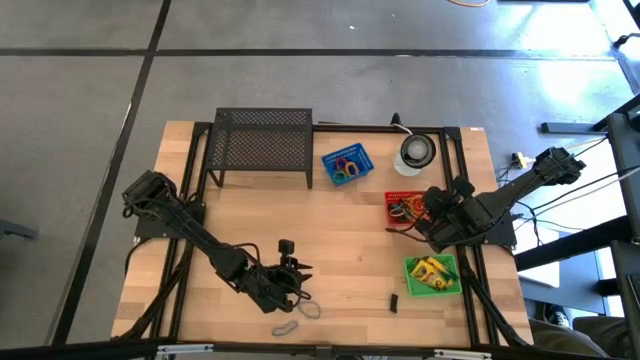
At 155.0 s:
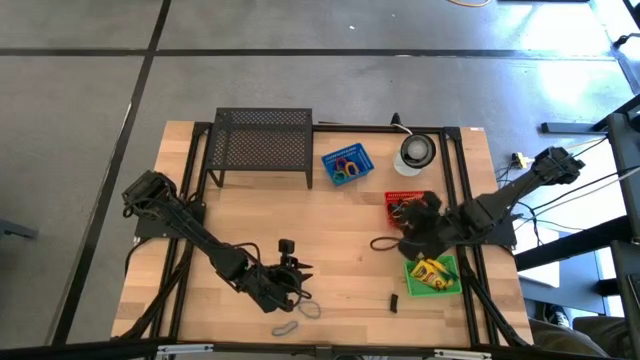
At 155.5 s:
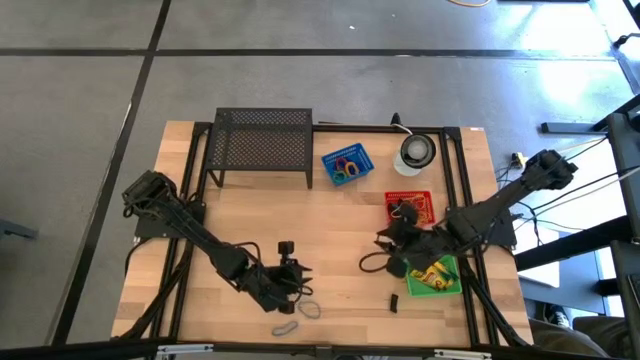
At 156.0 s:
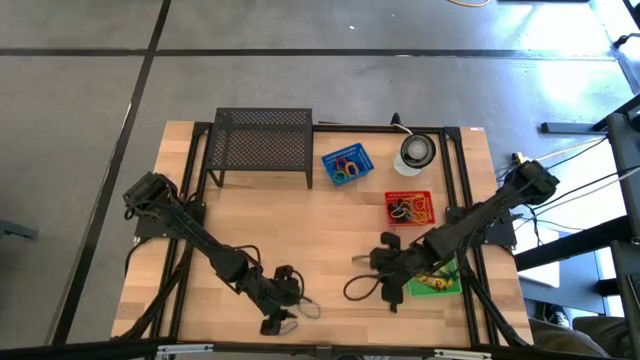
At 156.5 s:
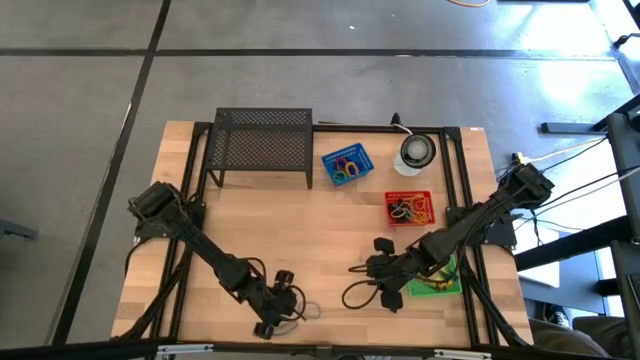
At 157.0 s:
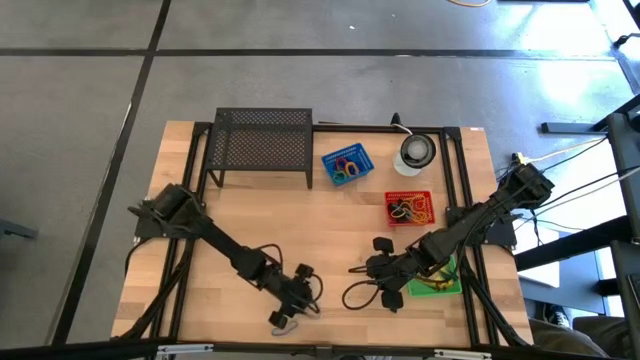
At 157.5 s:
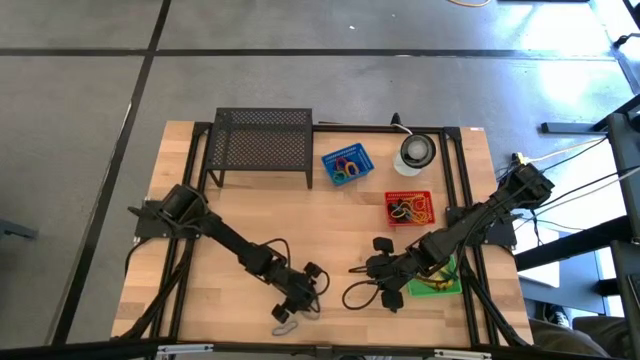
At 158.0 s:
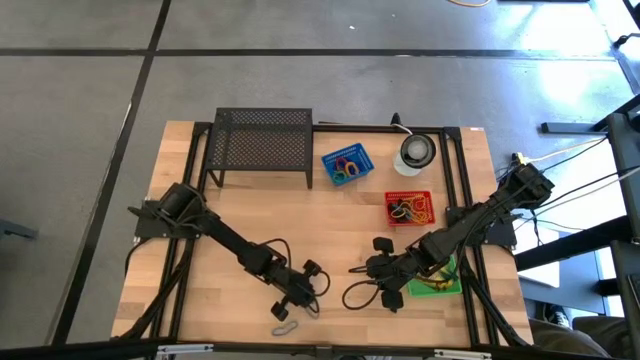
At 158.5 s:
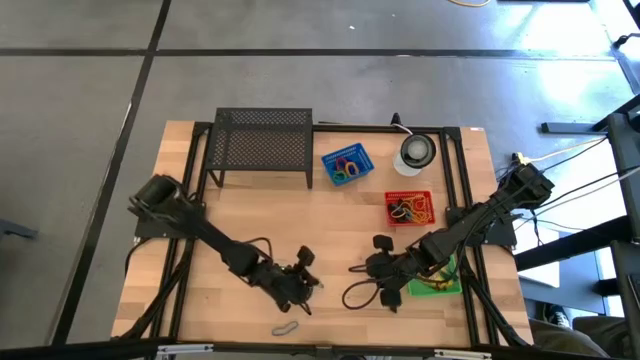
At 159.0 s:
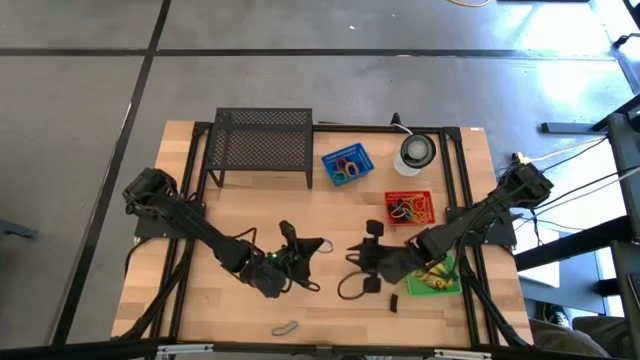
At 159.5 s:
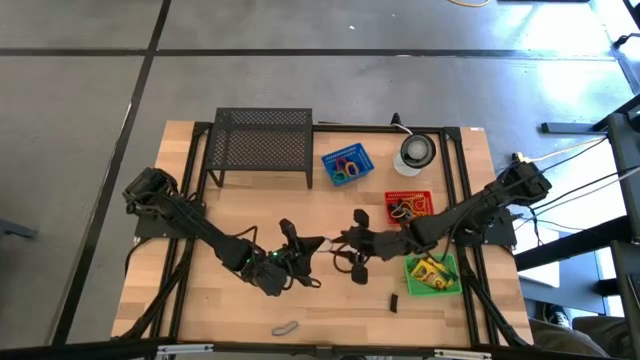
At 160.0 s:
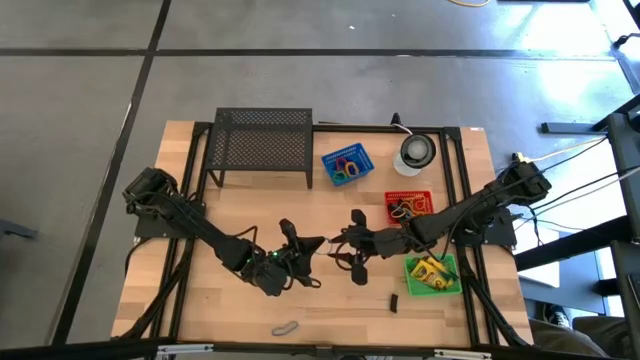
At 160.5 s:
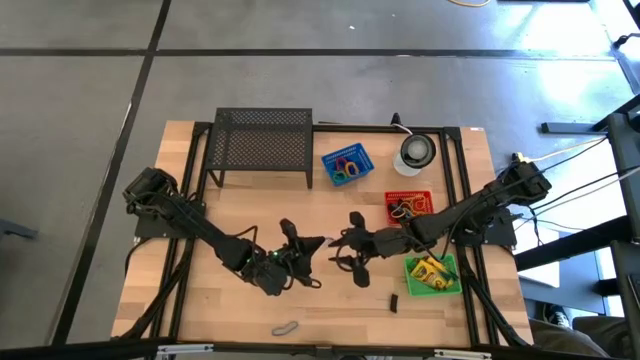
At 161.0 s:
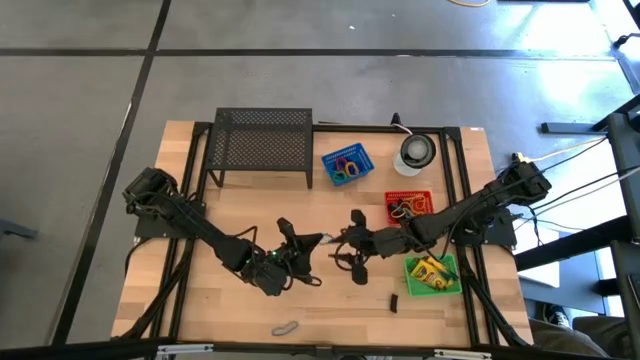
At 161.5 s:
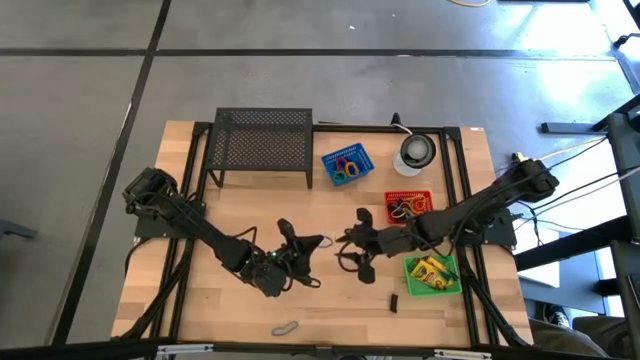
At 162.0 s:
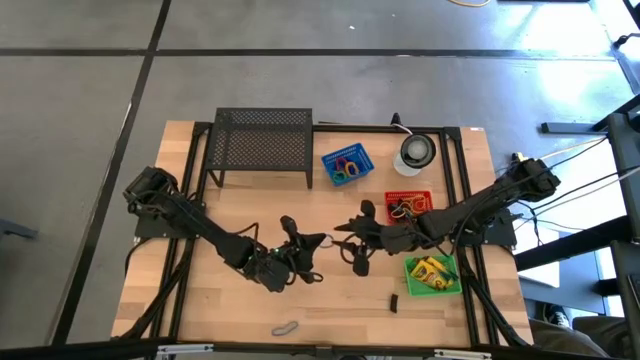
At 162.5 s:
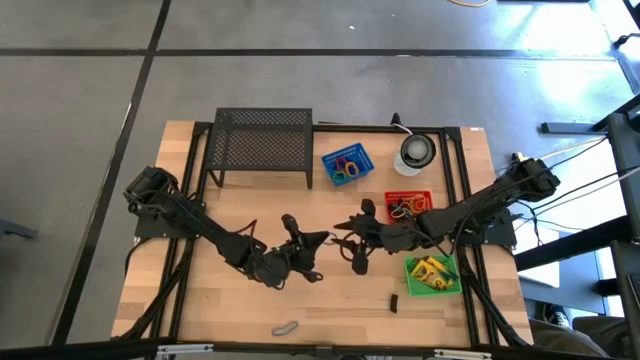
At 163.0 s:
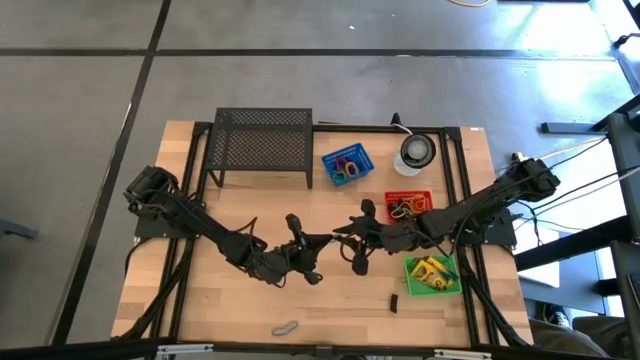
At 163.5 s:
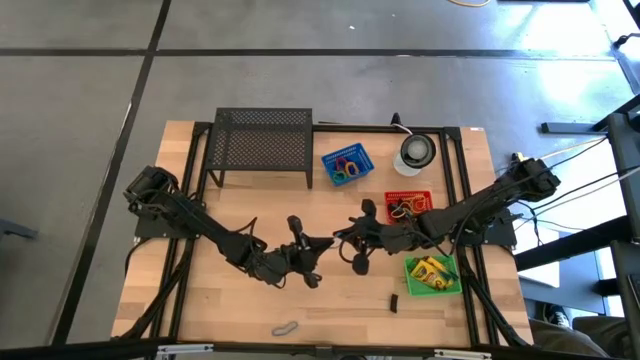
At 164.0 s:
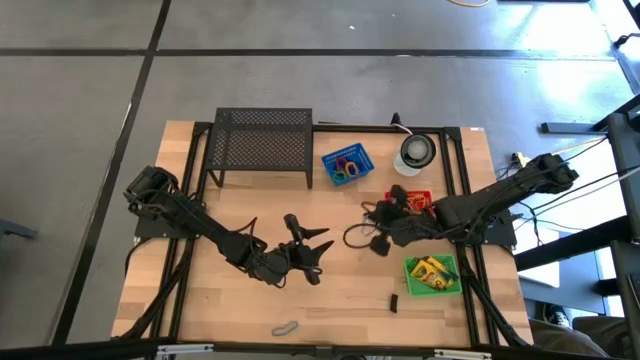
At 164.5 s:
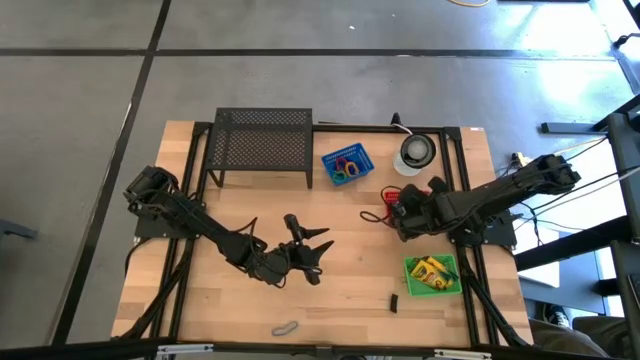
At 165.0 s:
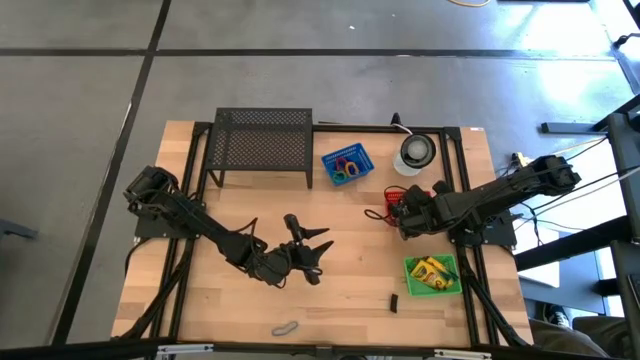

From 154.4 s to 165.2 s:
Task: Pick & Place Office Desk Supplies
Put the blue rubber band into the red bin

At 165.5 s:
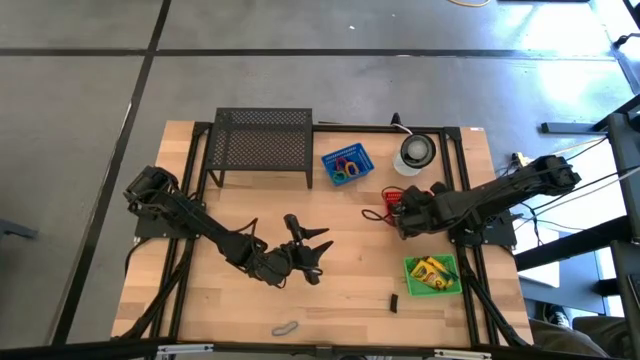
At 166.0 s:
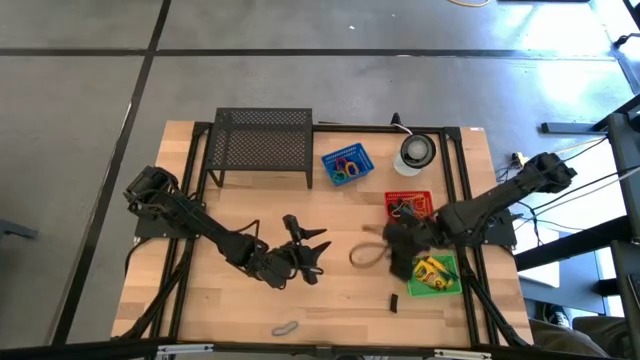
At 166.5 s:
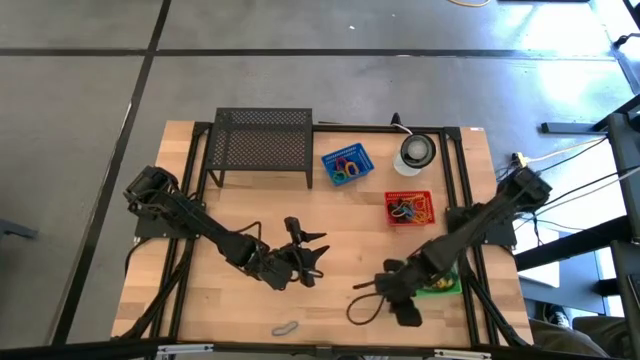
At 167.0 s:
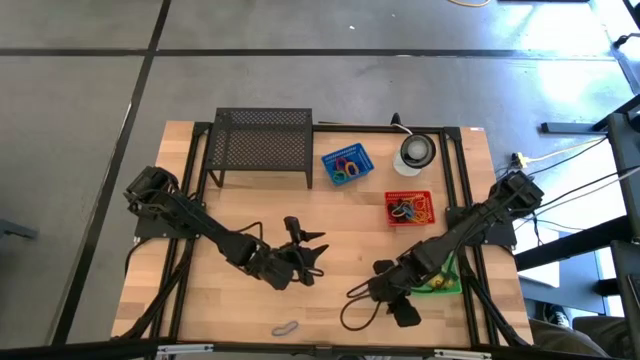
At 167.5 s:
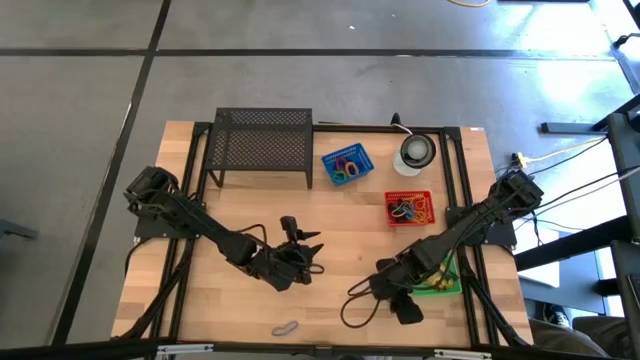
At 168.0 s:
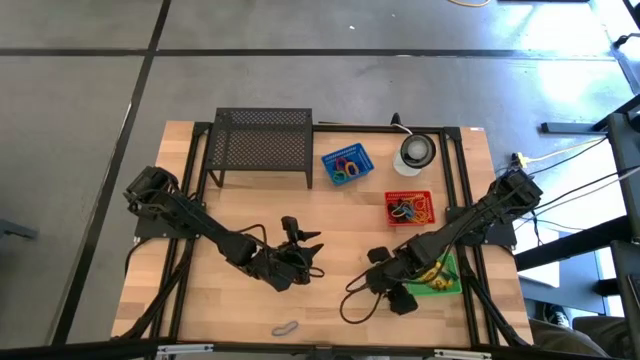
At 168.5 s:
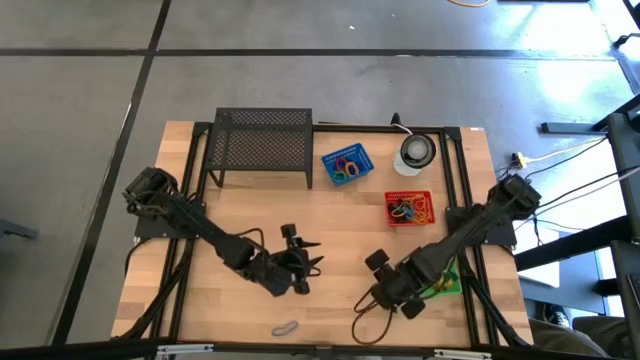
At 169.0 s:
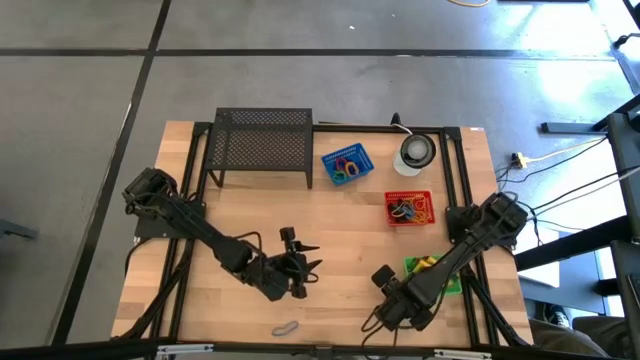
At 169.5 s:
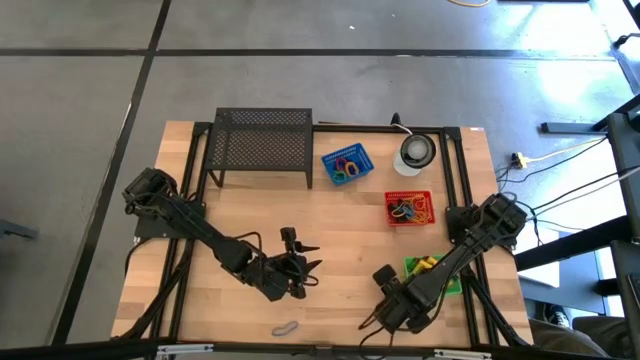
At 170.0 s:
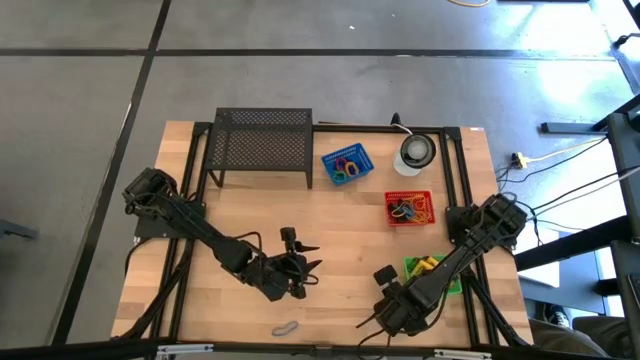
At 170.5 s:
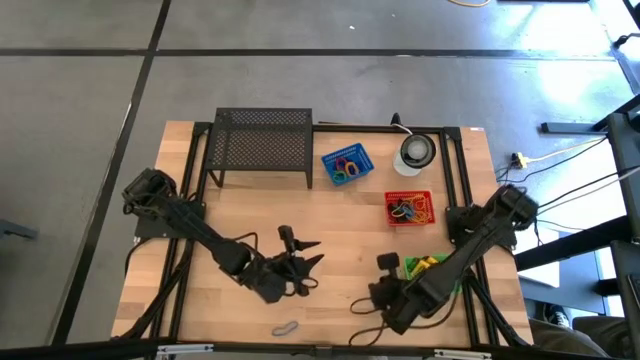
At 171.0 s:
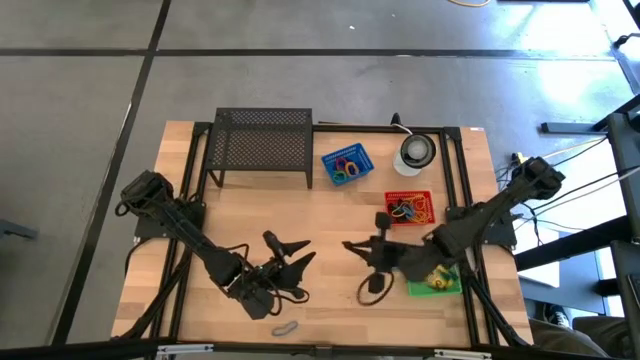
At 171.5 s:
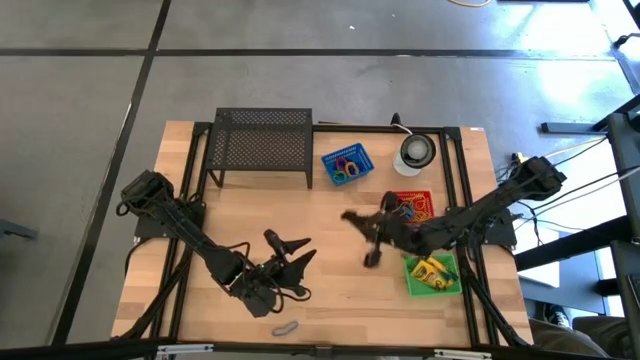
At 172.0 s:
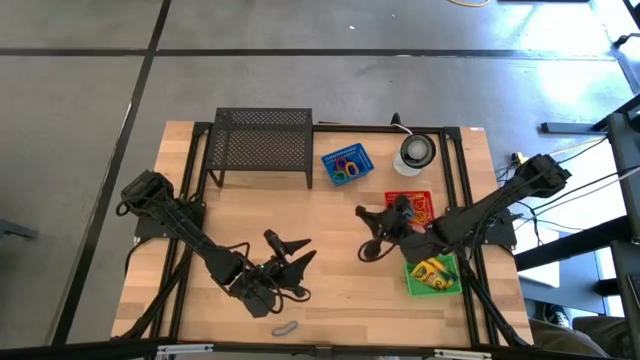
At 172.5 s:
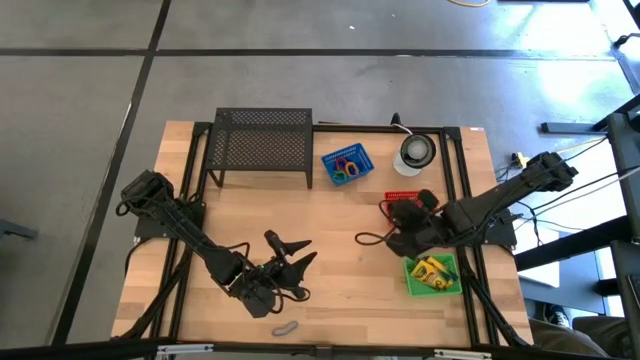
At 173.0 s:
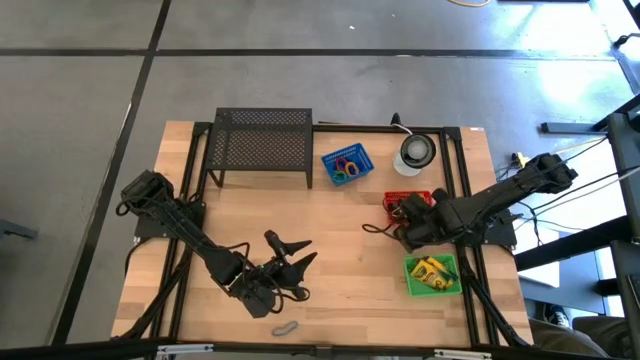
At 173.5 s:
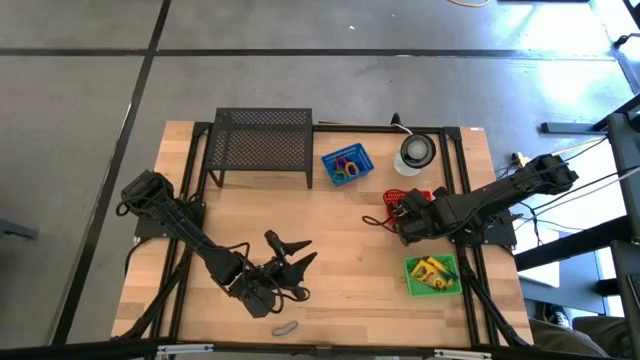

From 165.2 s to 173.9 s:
Put the black arm band into the red bin
